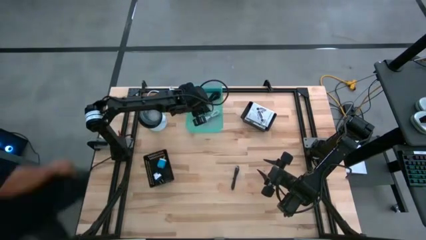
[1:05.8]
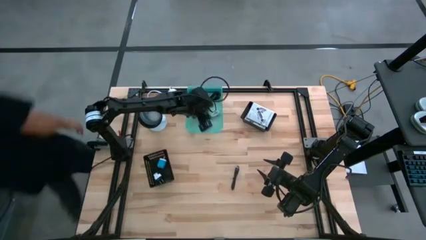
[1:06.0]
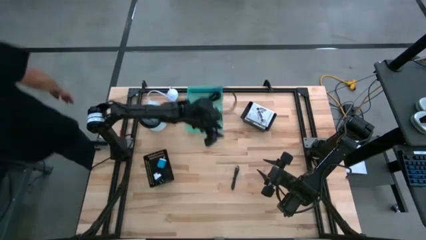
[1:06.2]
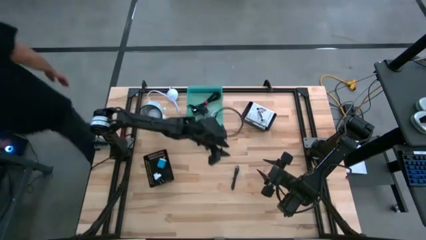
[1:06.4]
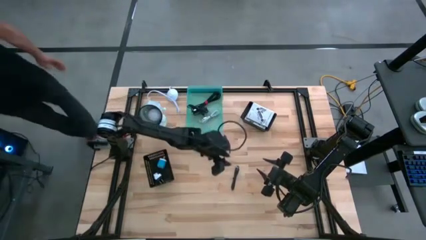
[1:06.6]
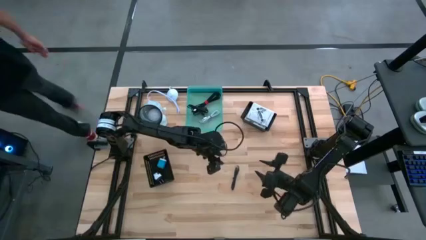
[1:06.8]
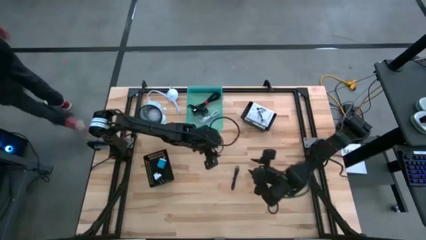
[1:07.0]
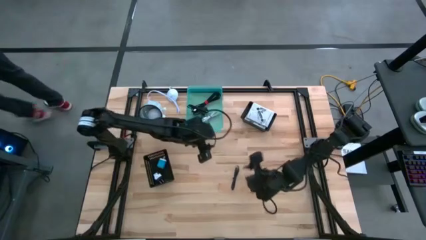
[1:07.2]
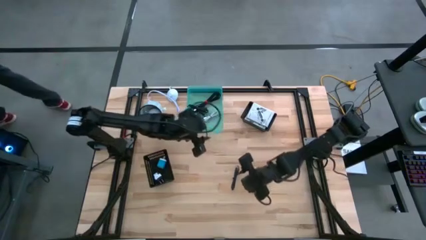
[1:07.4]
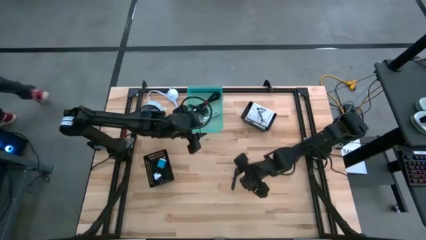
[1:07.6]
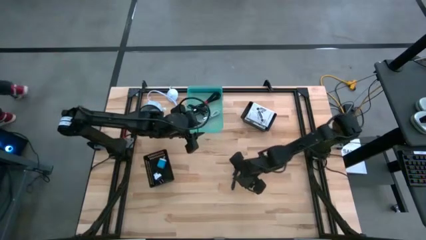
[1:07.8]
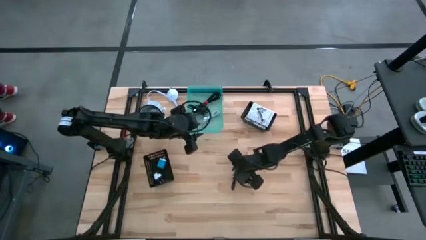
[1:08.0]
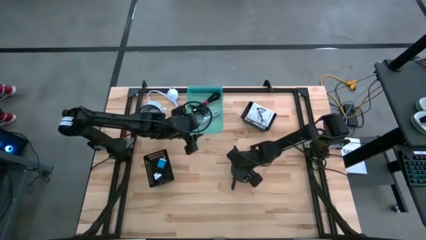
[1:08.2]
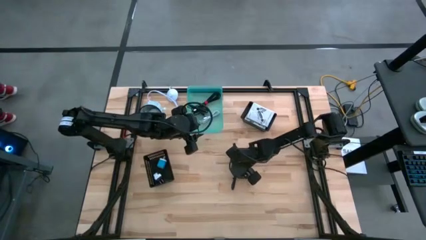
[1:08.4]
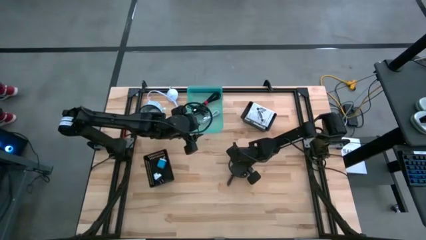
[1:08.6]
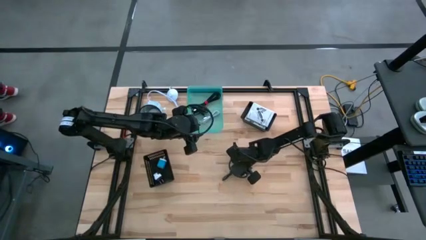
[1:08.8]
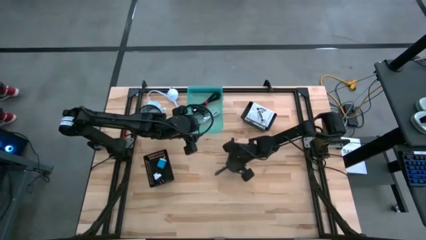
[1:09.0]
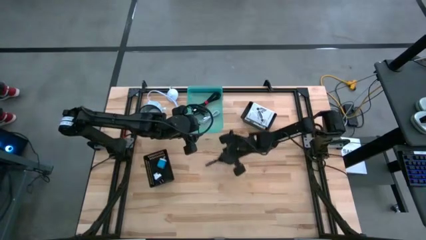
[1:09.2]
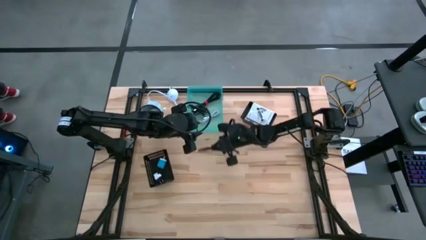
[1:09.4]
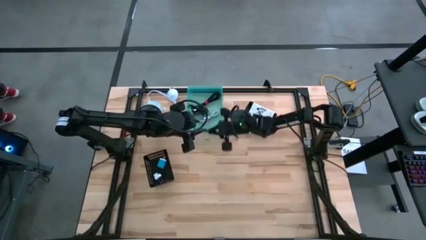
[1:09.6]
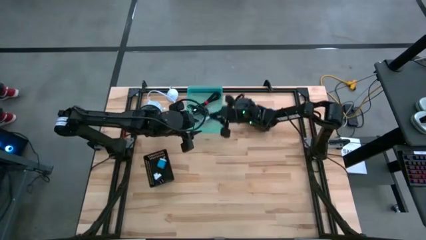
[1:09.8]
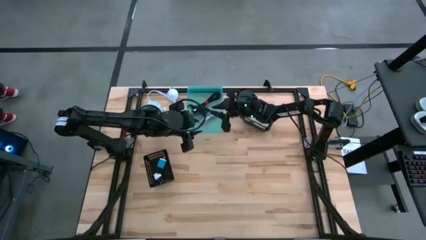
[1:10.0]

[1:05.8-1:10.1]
Task: Pick and place items into bin
Put the black charger cable into the green bin

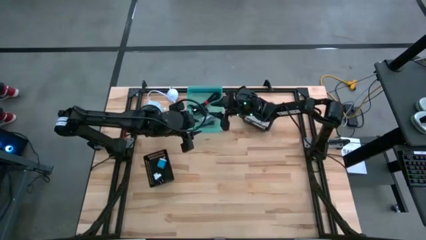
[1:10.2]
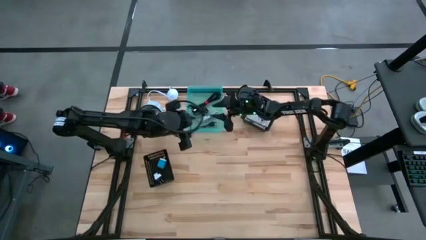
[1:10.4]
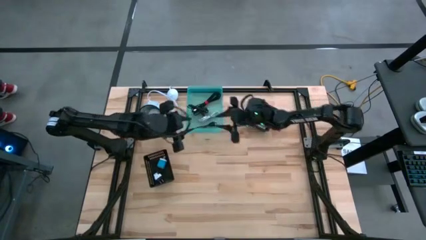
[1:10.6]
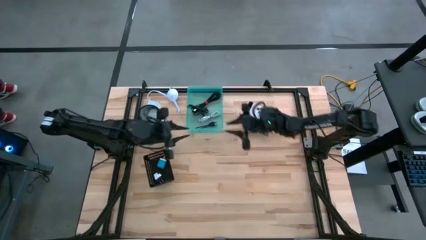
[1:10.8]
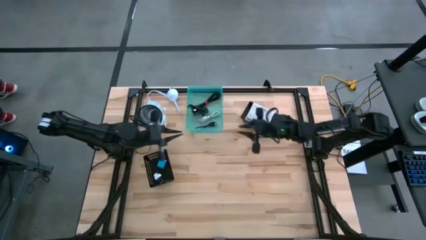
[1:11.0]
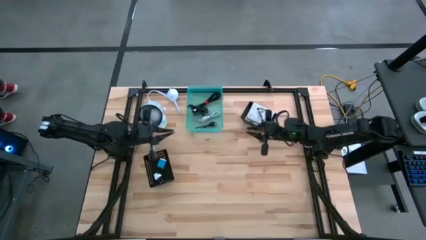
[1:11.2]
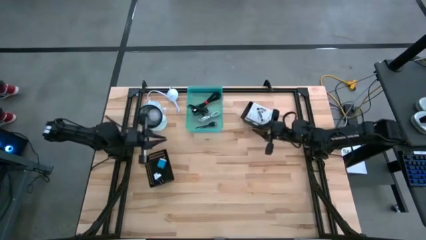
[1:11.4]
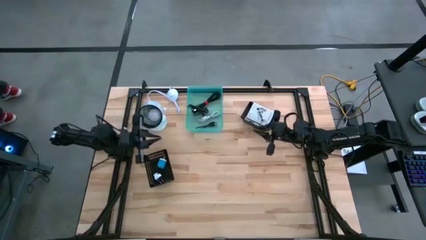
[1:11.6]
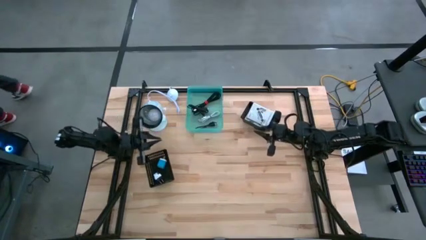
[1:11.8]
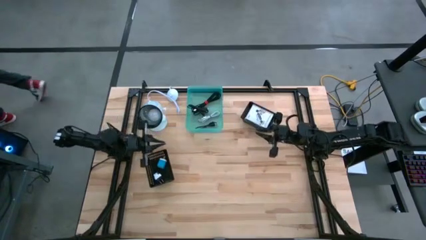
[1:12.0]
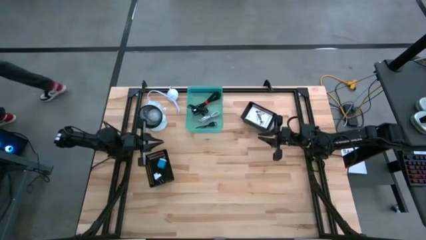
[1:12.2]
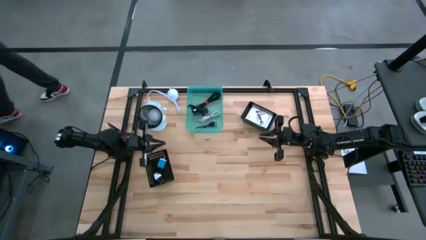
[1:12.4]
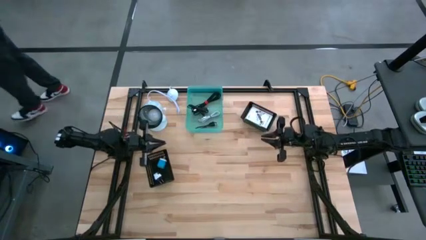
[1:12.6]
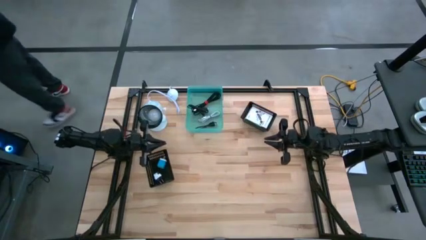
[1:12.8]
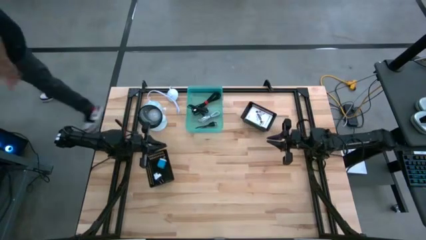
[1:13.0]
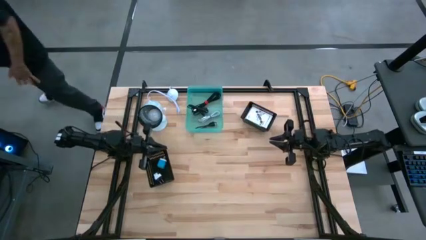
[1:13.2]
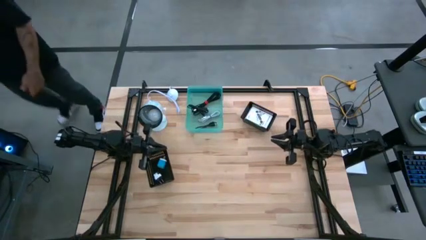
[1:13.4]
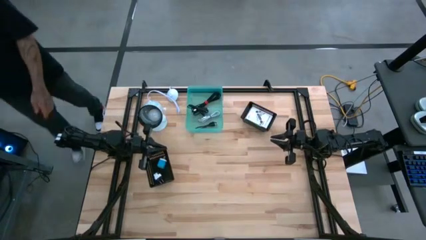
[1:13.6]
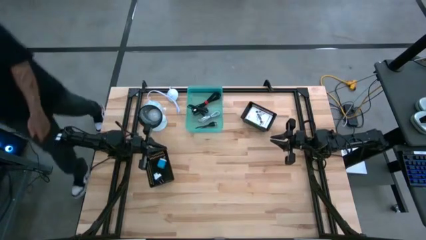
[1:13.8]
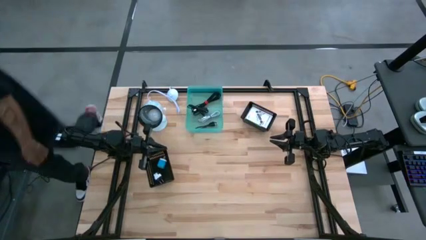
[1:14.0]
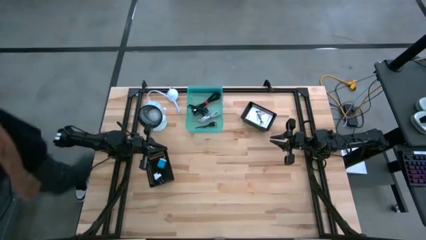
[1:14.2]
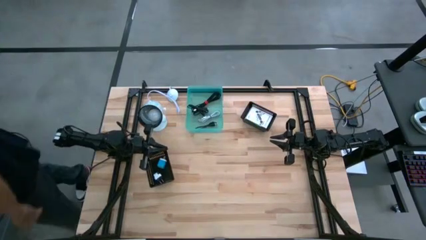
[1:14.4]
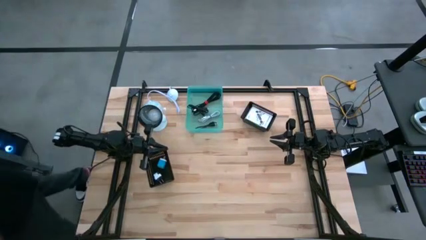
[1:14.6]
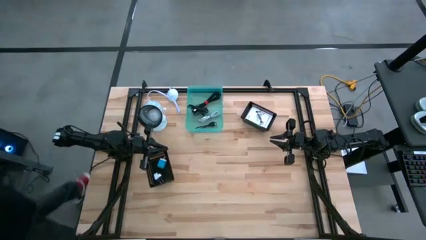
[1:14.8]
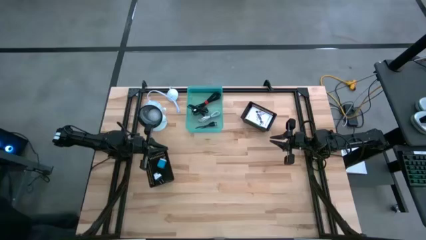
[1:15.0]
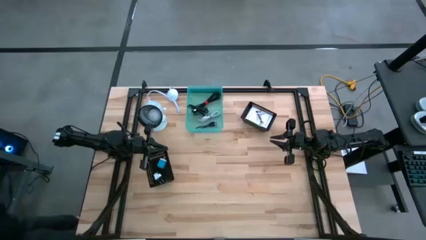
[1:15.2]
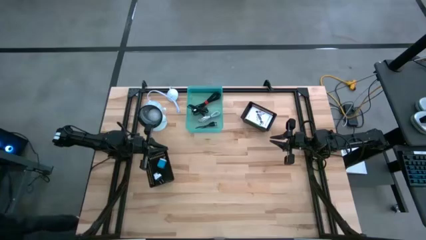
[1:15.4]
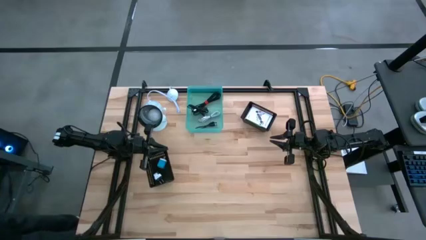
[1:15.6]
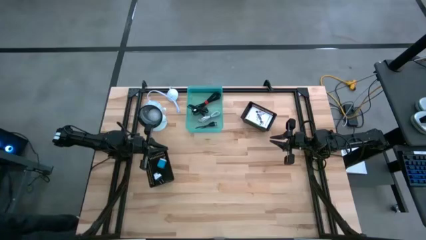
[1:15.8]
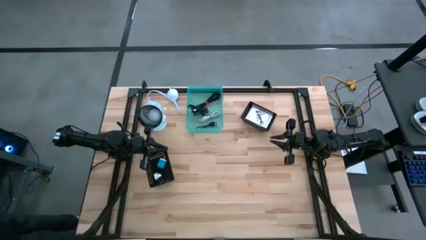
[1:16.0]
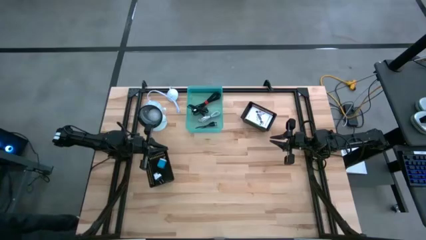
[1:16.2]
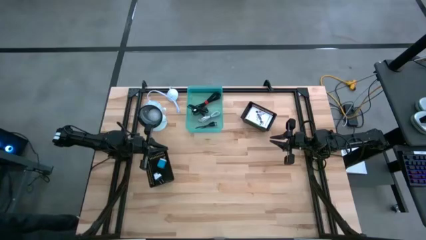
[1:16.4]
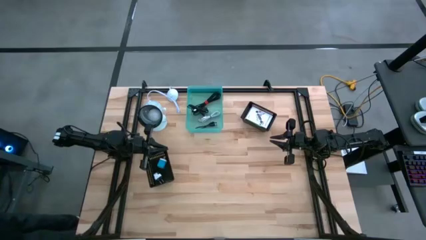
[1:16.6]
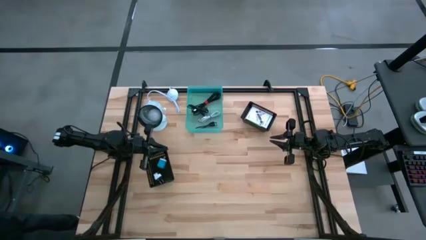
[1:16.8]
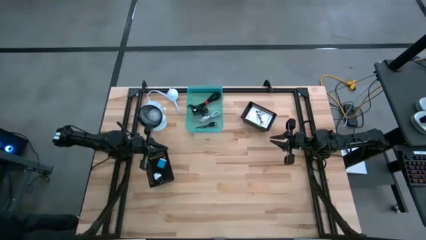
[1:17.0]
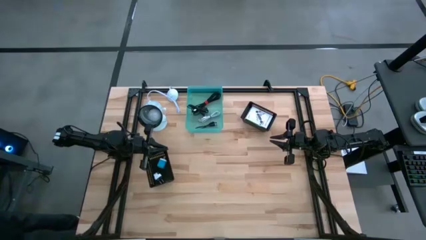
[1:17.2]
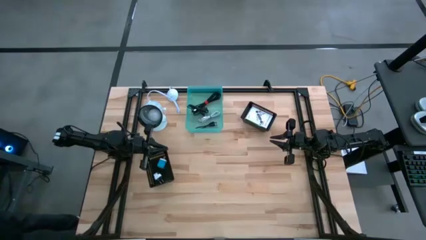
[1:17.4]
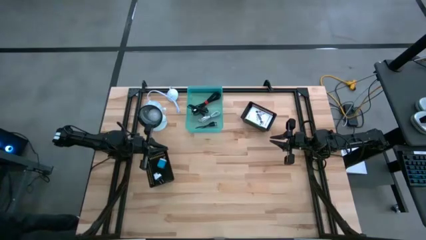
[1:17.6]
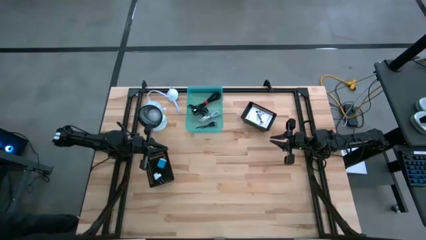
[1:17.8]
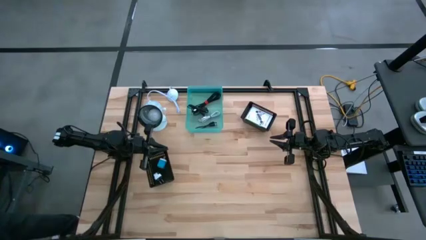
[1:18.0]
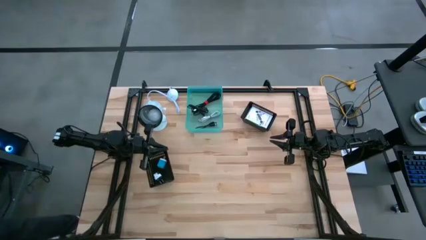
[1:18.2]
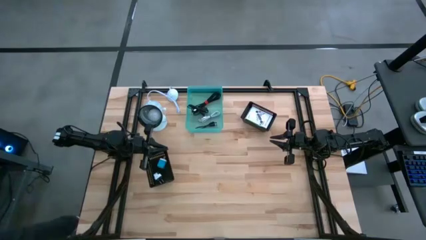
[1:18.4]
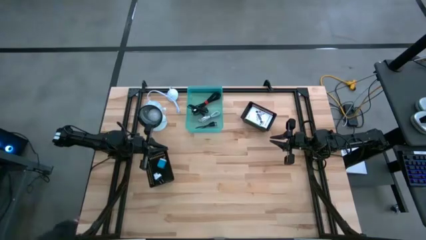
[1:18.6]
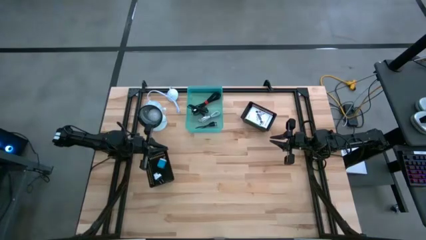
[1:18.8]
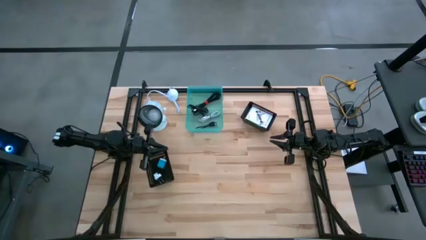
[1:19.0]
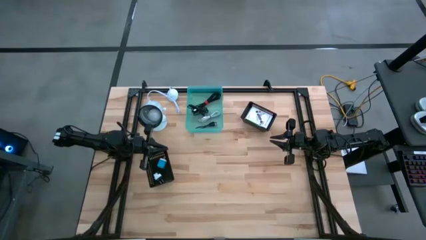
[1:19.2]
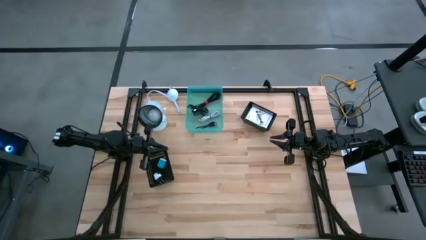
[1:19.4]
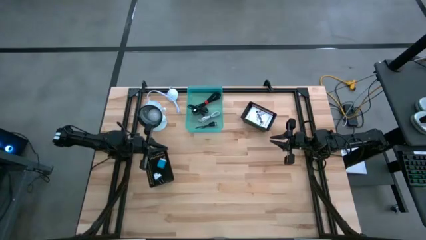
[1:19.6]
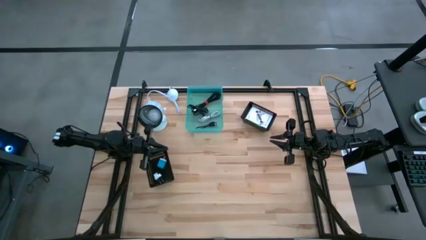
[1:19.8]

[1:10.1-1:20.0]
Return to Home Position

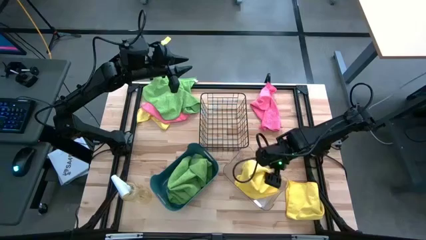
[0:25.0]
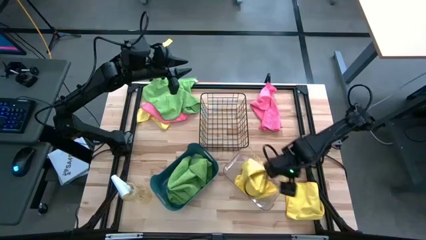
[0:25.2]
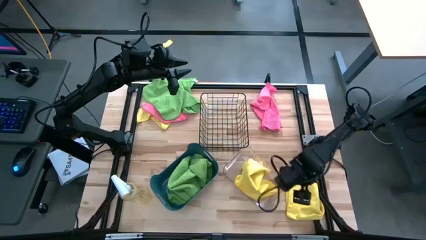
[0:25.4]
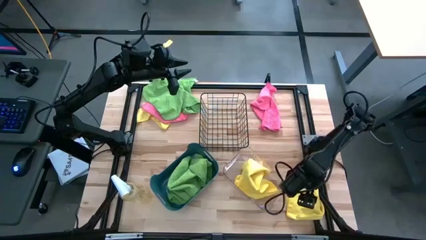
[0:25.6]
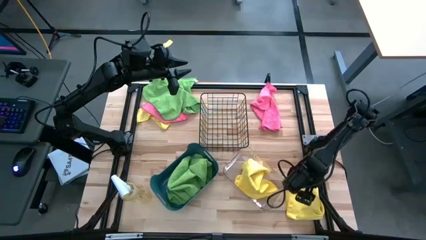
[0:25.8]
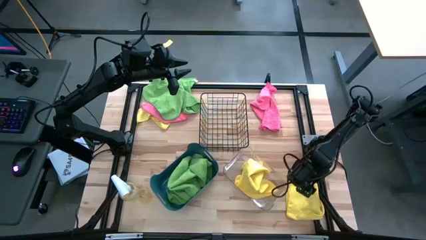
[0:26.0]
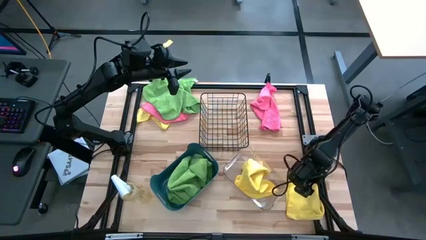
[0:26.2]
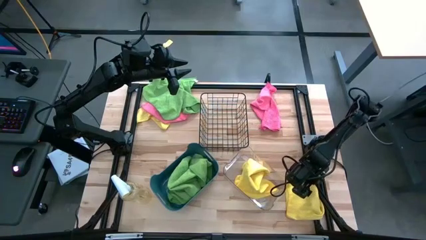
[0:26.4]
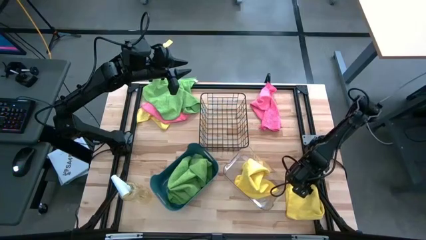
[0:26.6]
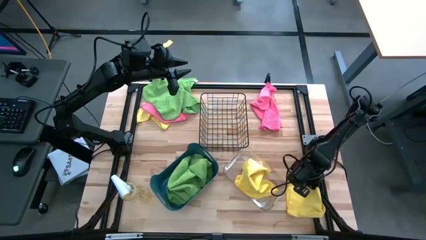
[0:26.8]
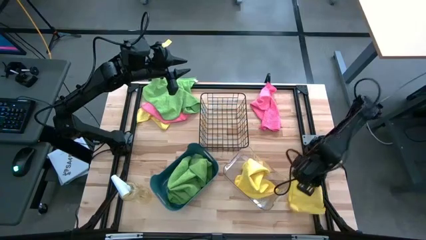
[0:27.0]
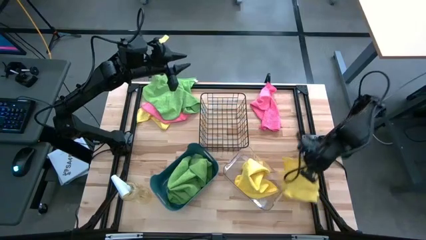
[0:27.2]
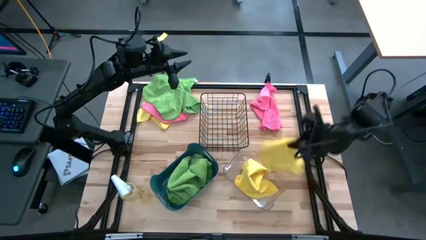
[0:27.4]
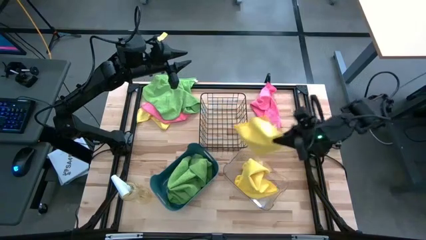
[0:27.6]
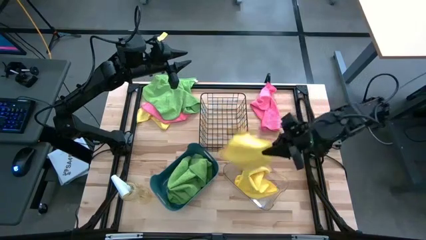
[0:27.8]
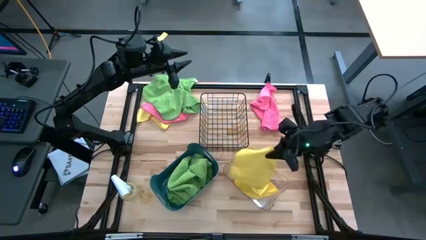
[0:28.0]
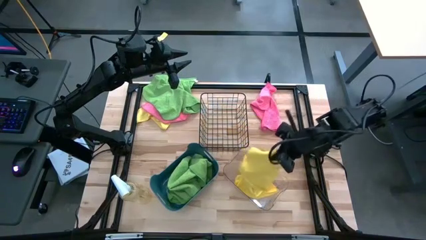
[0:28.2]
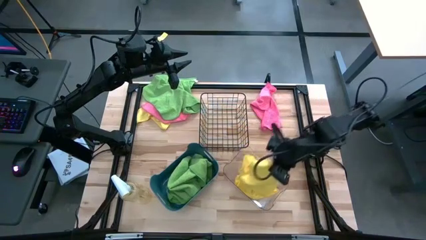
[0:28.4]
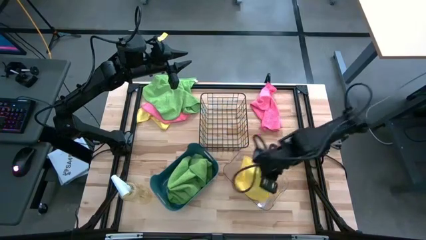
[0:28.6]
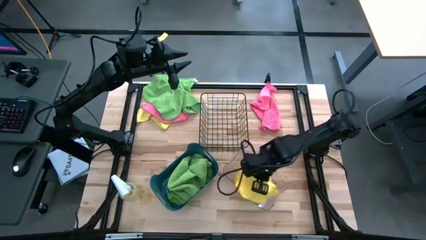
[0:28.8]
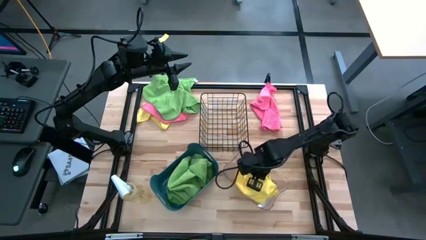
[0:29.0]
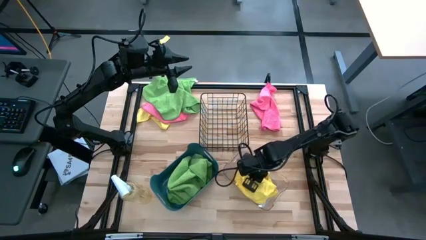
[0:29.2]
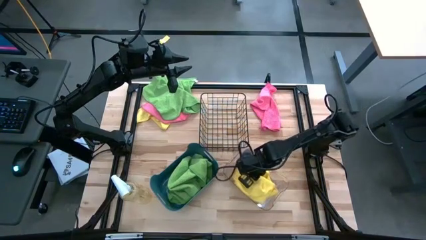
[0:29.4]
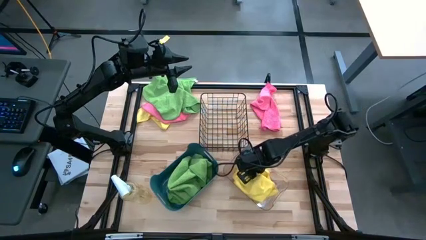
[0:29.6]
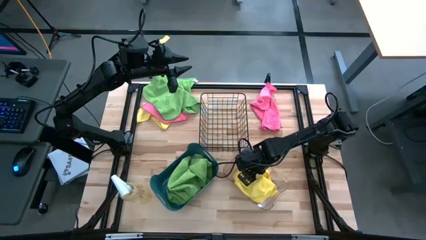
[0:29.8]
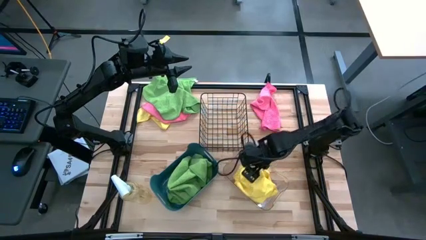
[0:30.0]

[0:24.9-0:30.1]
Task: Sort microfiber towel by color & place in baskets
Put the bottom yellow towel into the transparent bin
